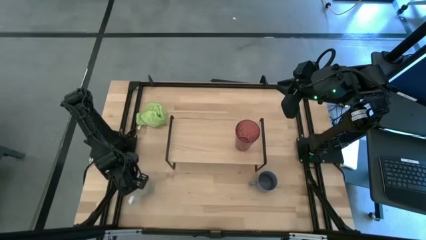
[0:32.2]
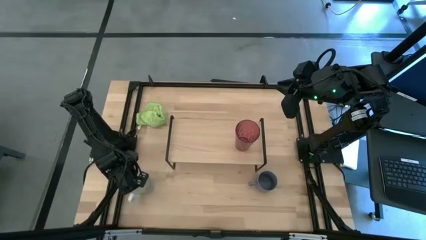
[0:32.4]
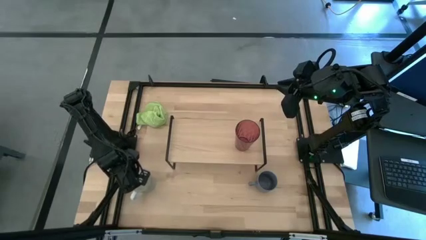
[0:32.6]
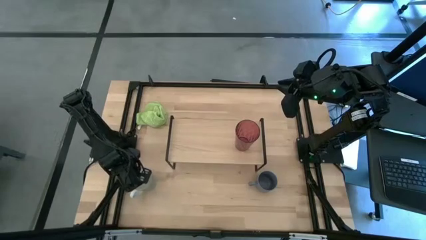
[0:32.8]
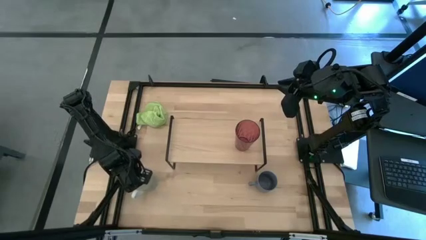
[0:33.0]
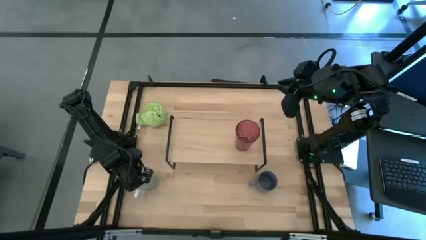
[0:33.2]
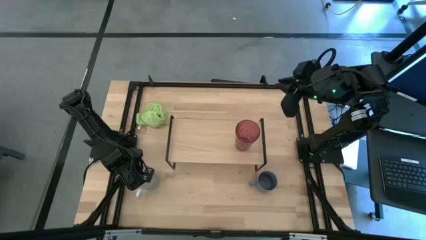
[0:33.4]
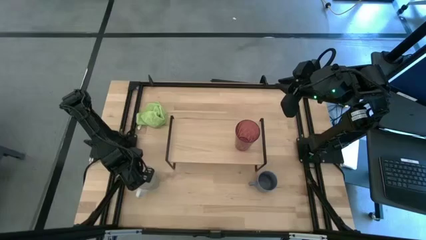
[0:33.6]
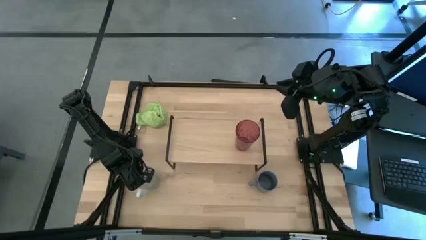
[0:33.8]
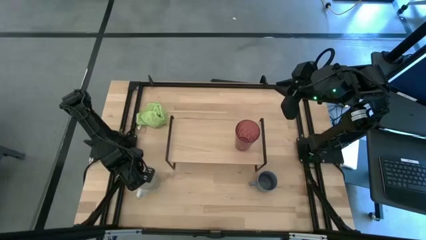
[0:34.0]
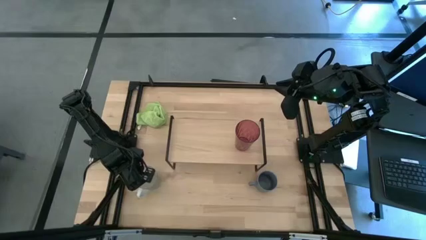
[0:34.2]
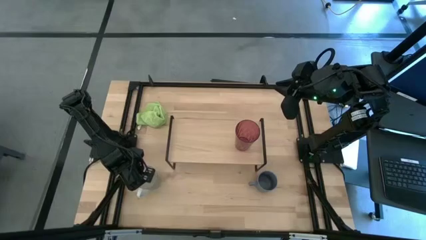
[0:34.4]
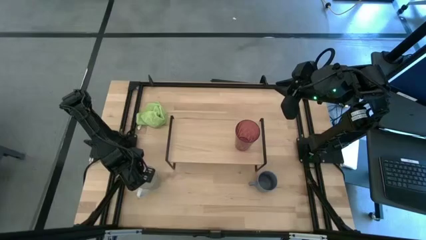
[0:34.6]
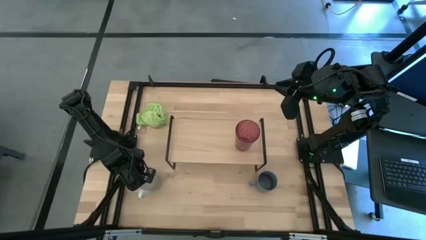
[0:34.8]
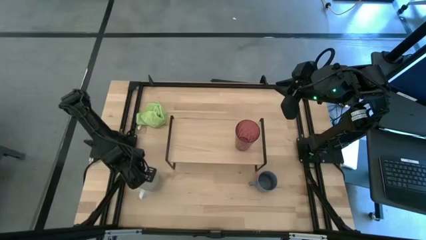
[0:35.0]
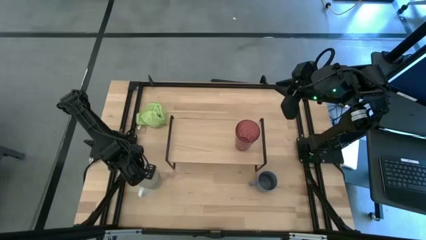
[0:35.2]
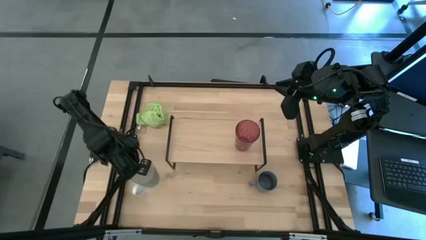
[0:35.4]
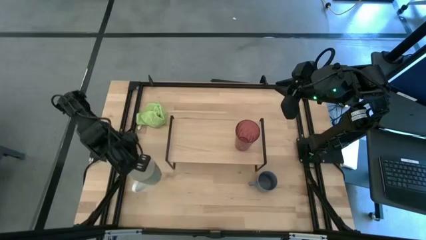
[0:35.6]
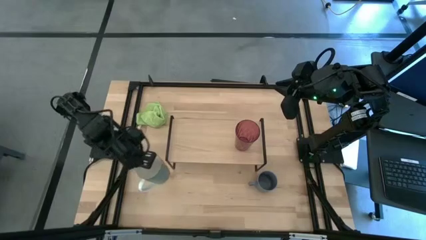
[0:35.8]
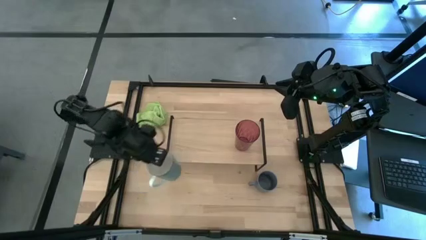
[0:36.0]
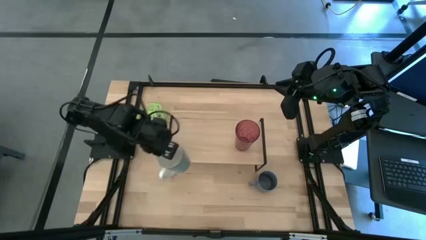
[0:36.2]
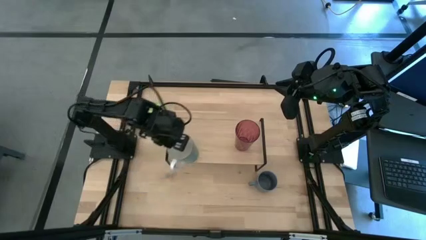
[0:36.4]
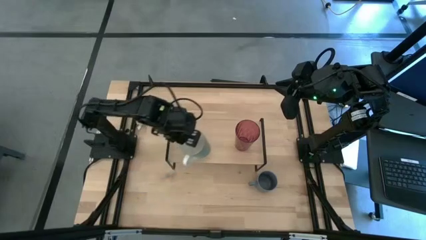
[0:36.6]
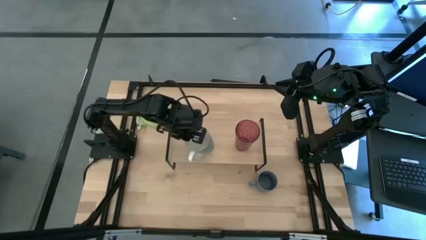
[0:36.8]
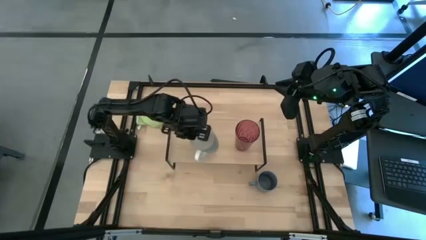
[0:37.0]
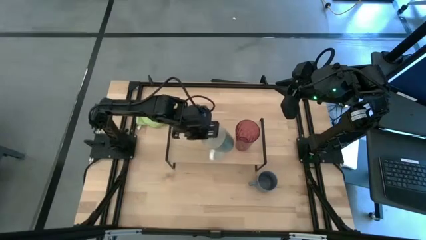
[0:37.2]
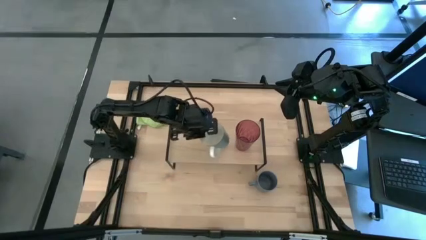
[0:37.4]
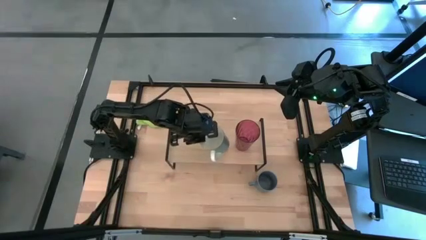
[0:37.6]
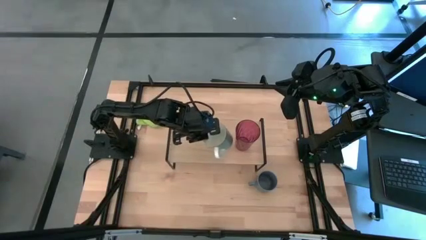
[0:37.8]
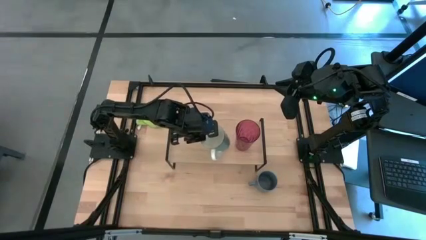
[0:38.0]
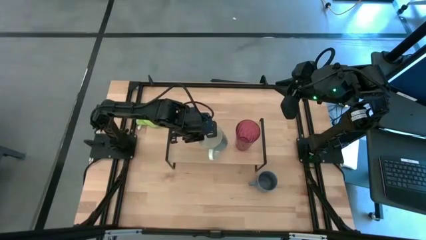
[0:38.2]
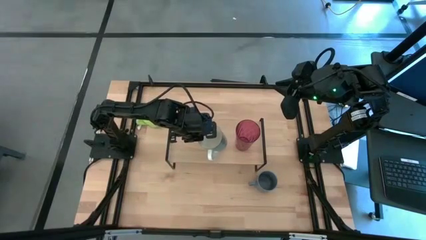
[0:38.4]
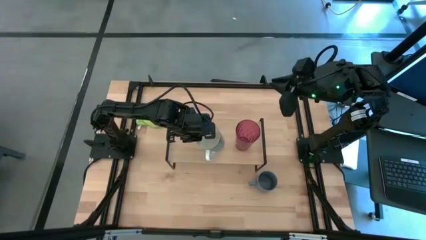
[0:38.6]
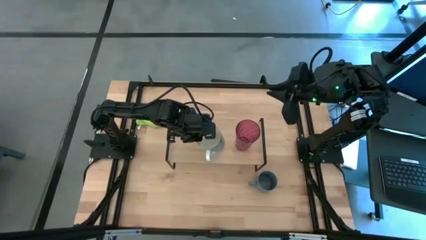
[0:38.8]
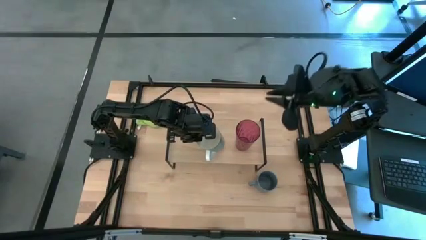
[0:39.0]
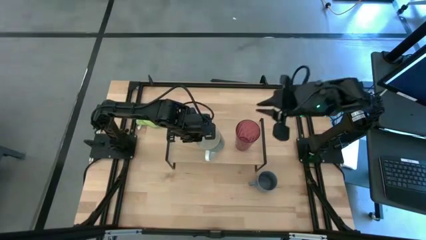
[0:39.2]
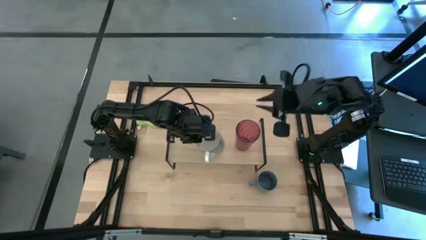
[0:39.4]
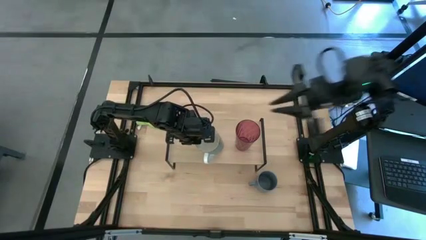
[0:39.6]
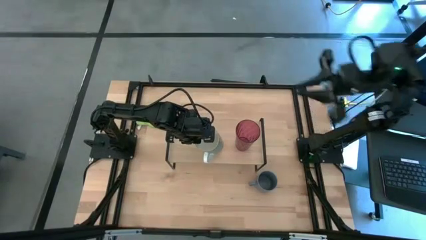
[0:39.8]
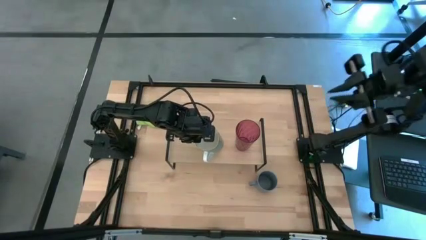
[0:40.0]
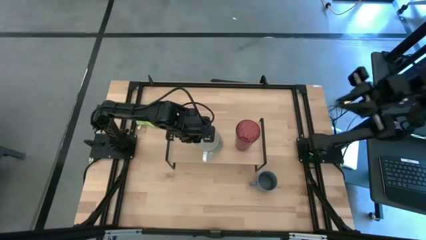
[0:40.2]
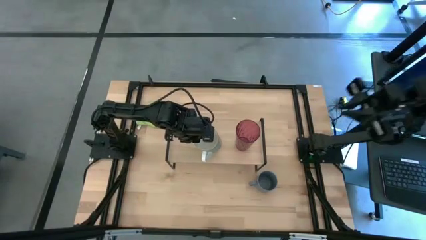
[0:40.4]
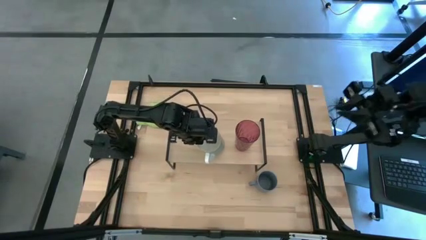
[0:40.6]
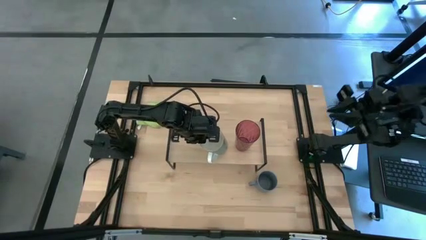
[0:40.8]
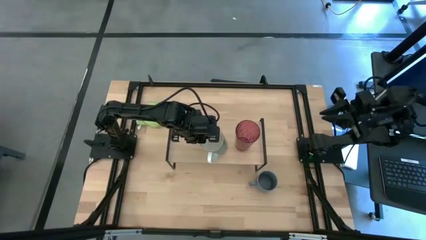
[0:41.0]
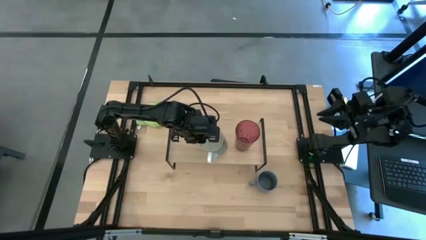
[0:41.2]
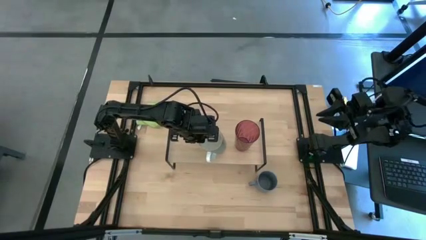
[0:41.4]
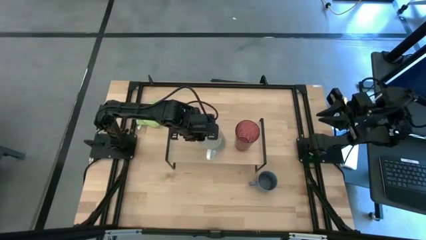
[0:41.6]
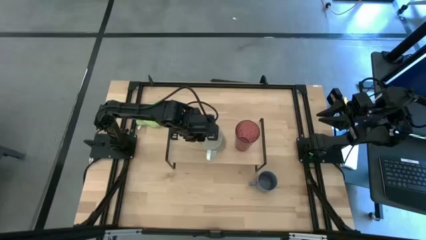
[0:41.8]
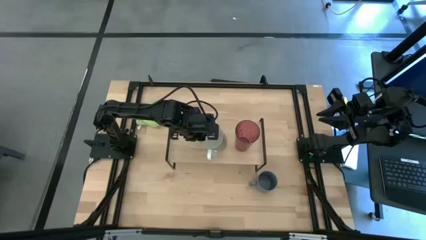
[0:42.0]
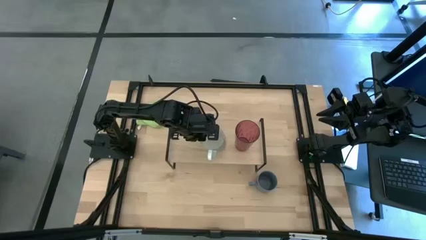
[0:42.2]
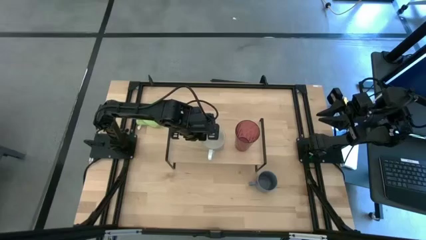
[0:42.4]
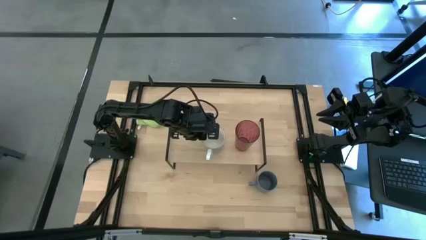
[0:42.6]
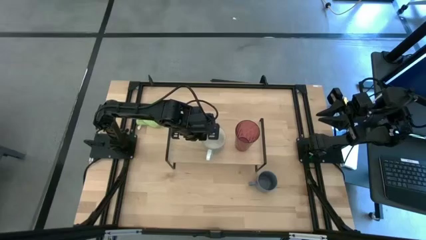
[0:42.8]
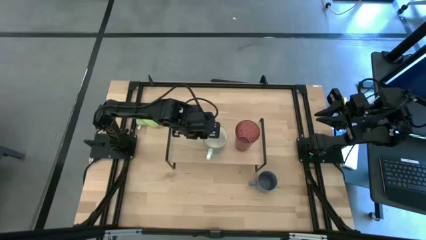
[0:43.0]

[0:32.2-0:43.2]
Task: Stack small to large cups/mugs on shelf
Put the white mug on the shelf
